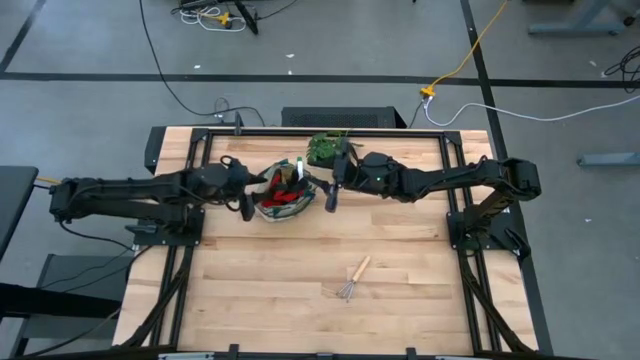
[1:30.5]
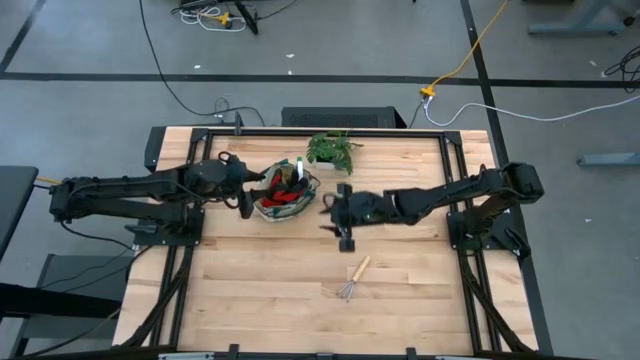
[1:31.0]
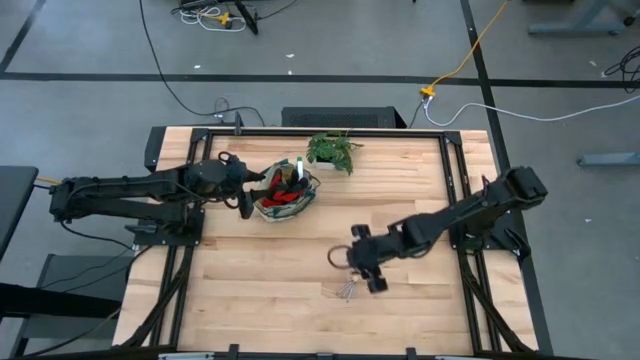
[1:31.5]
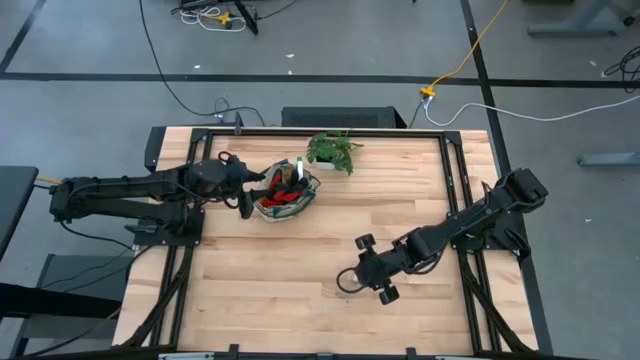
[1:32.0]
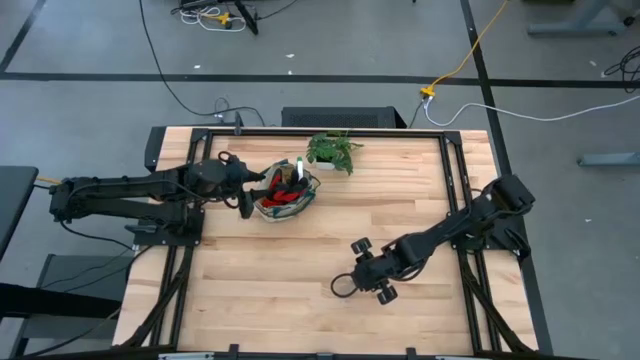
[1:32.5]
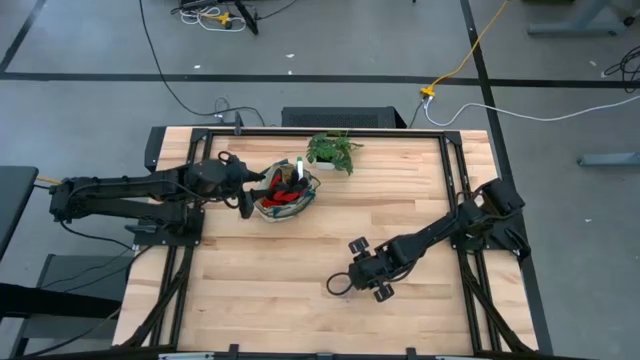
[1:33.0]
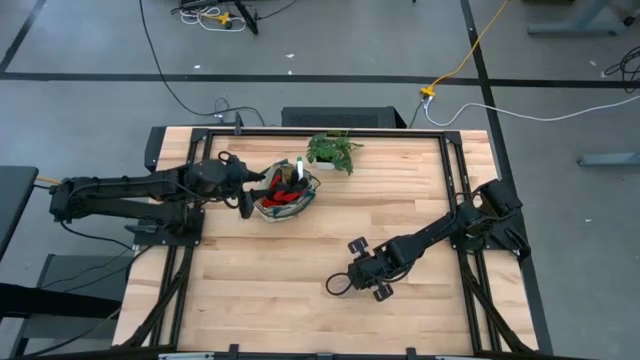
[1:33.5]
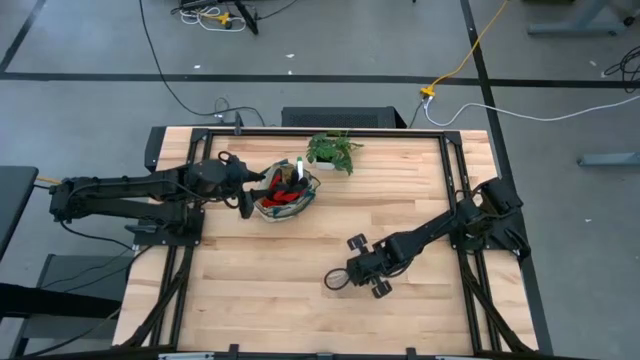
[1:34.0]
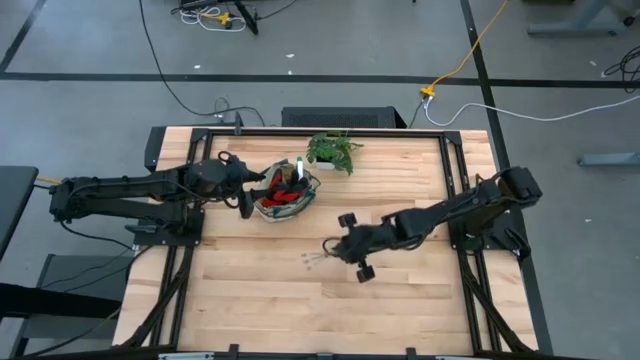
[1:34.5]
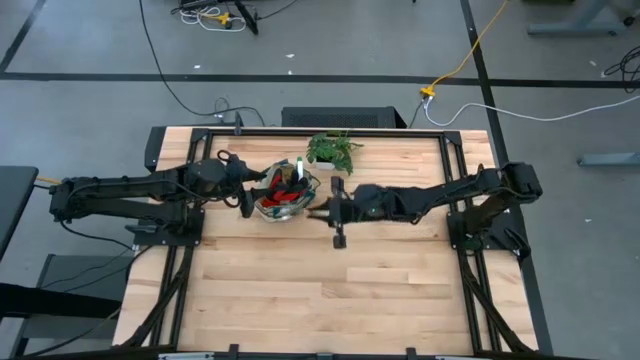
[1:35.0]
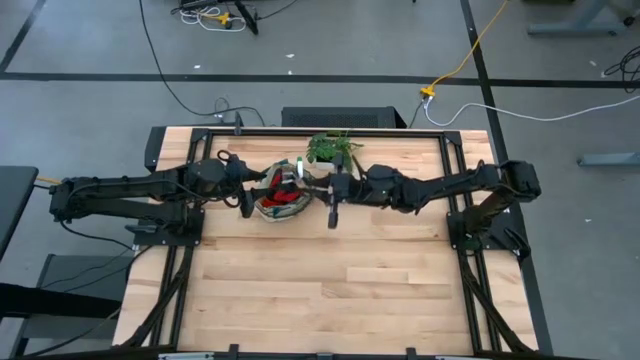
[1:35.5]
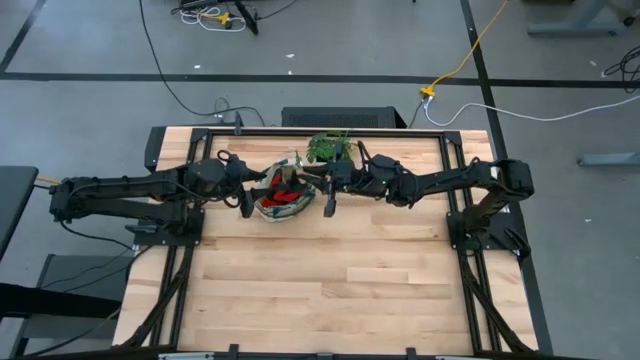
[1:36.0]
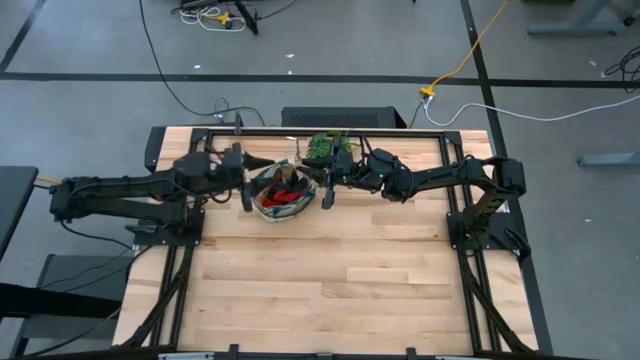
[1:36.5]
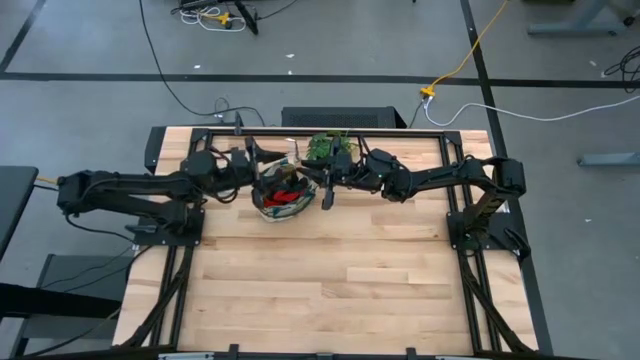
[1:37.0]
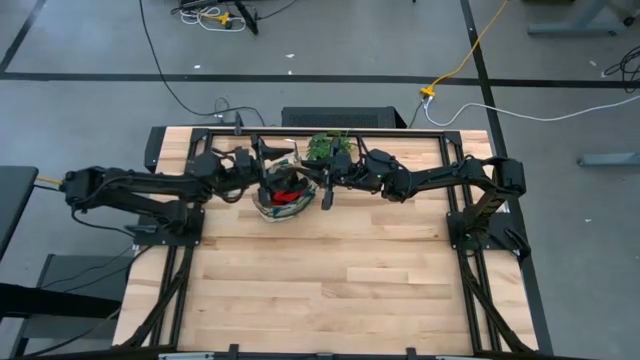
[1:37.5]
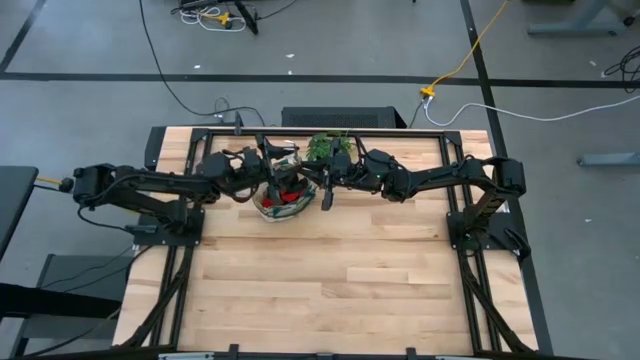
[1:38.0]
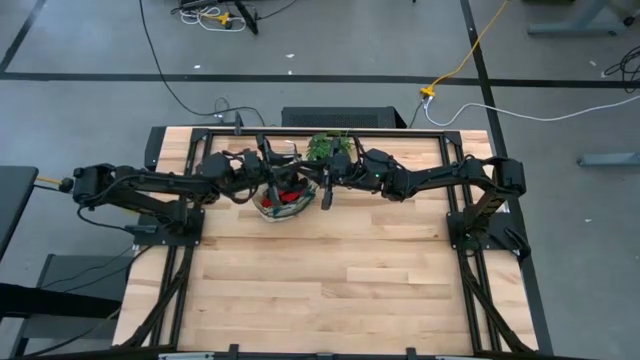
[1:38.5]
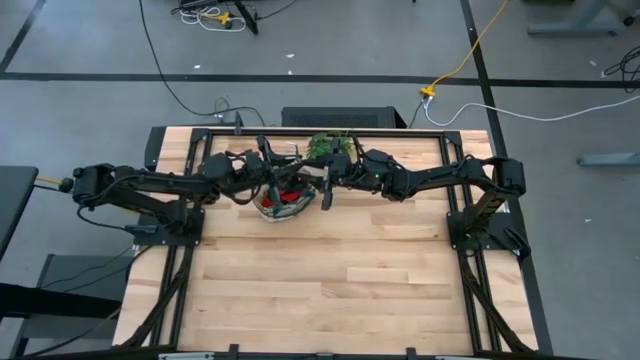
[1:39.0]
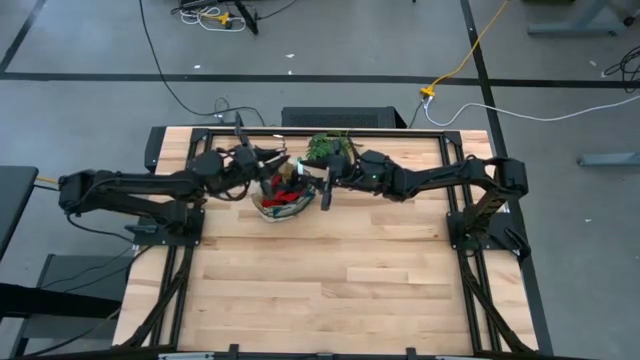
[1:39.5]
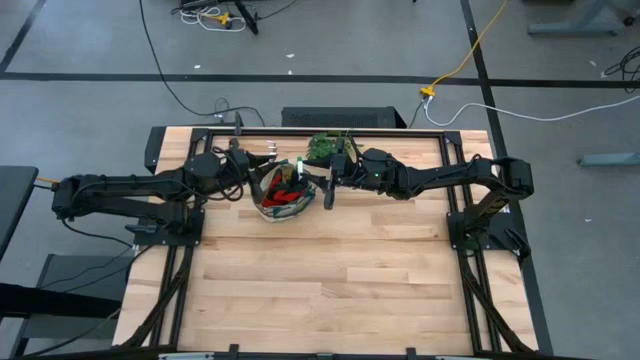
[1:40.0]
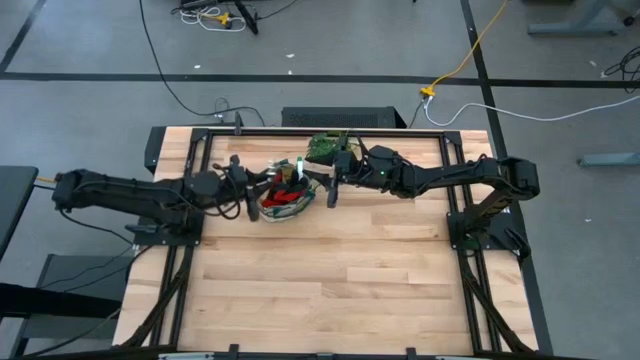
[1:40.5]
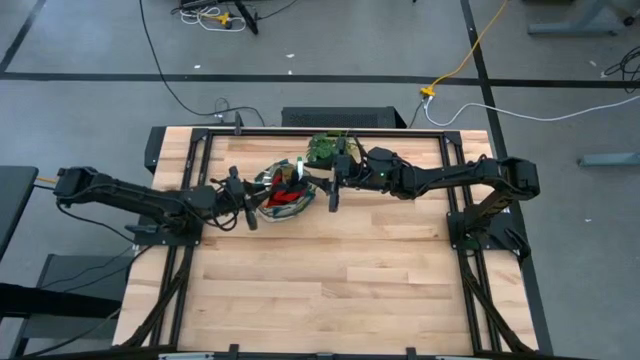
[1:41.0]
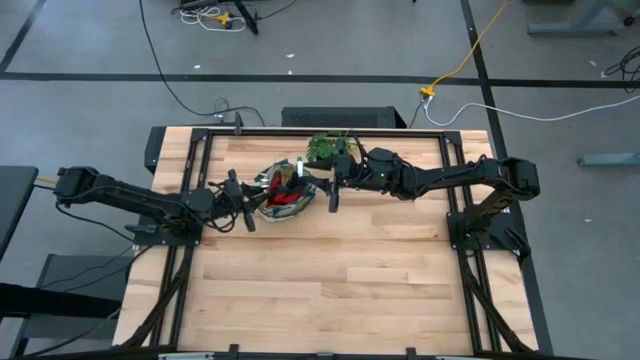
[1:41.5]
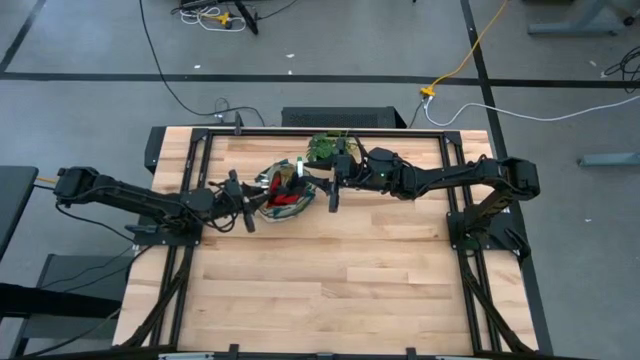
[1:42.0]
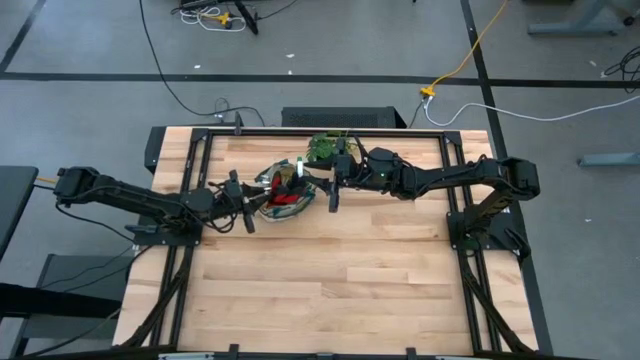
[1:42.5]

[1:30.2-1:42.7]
Task: Pick & Place Garden tools in Gardening bag
Put the brown hand rake into the gardening bag

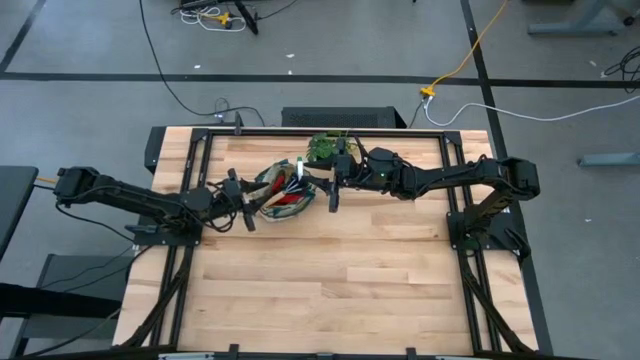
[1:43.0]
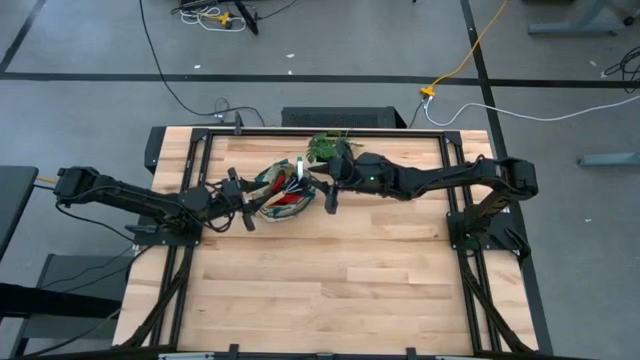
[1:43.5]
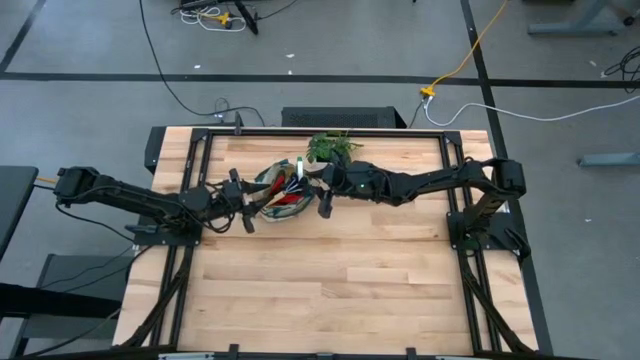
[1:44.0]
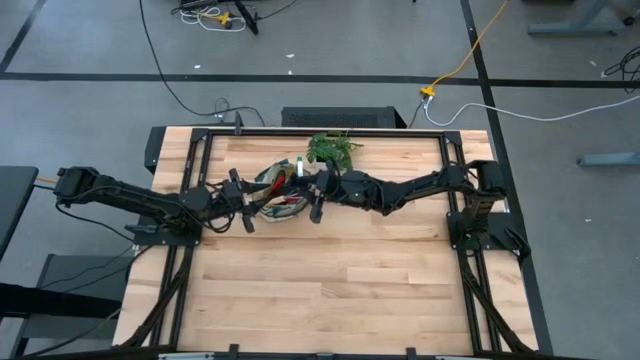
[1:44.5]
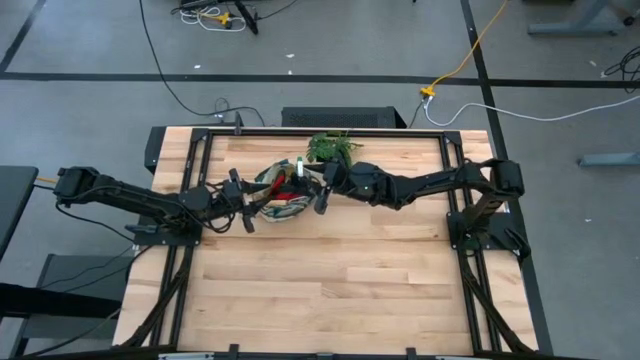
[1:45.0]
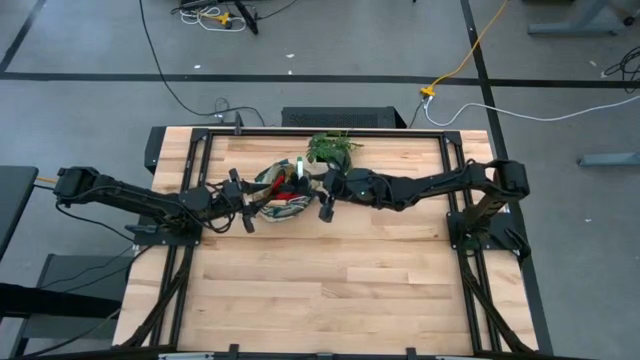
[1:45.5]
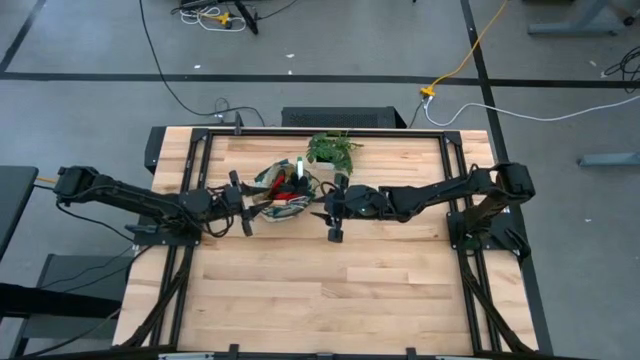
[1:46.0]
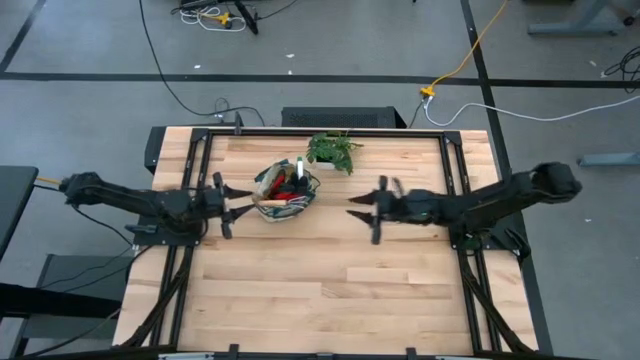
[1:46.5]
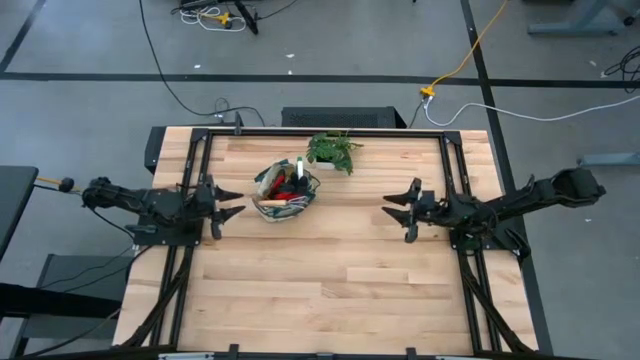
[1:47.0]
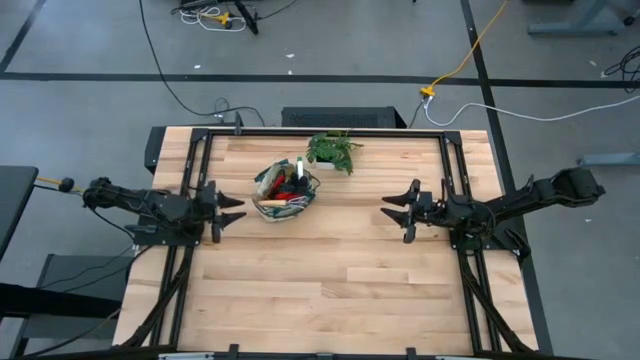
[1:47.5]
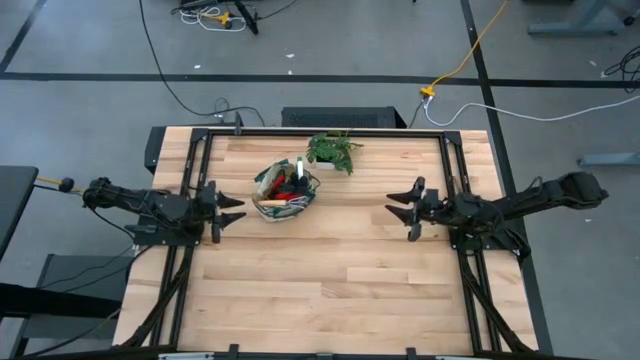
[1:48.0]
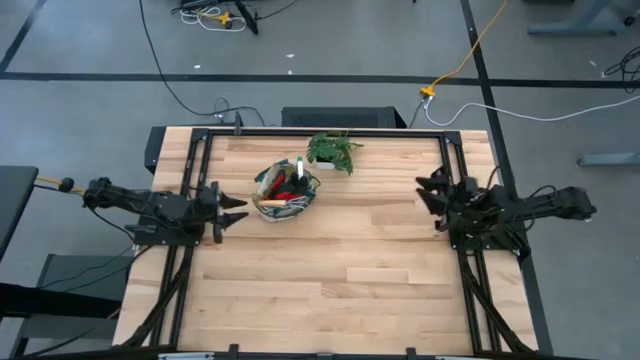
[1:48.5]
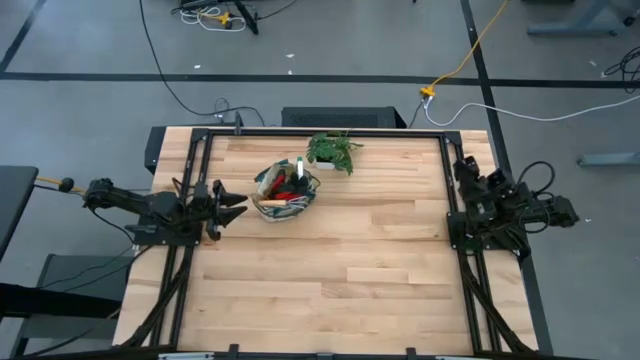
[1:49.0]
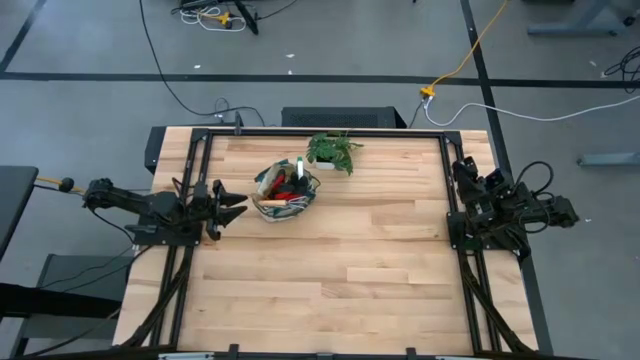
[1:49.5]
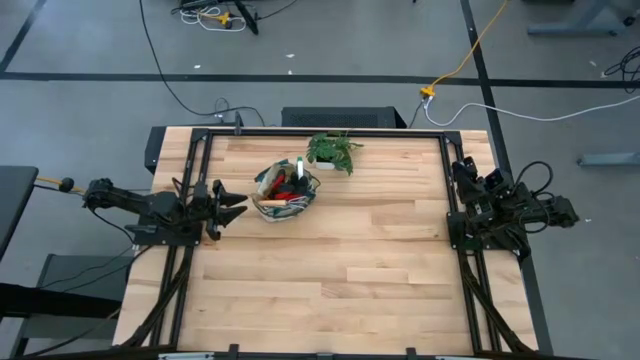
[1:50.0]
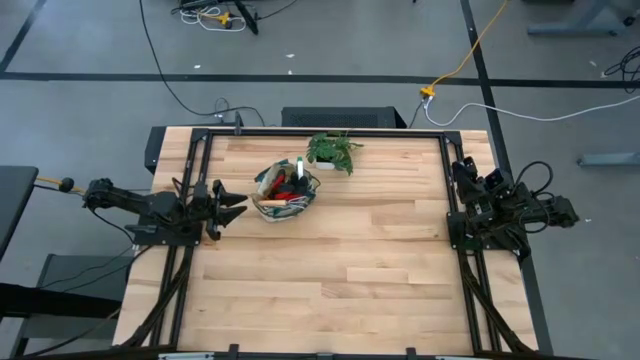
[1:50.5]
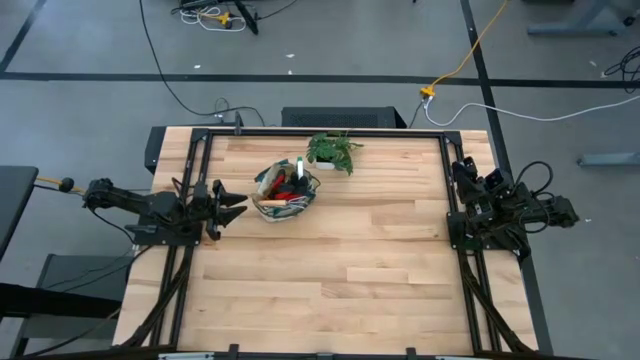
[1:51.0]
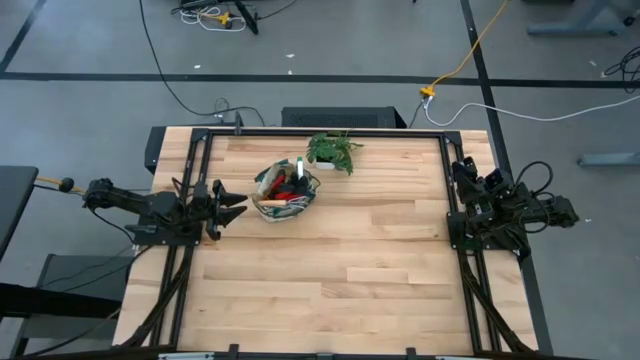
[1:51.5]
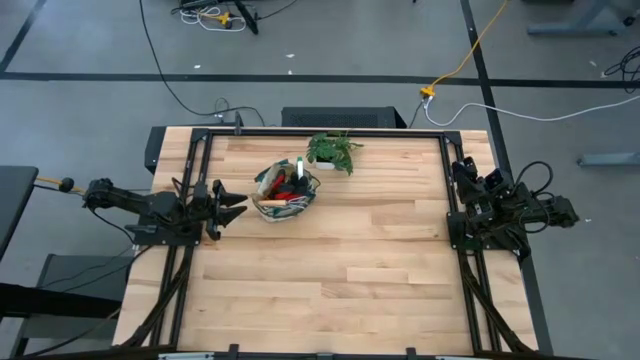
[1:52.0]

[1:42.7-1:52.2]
Return to Home Position
